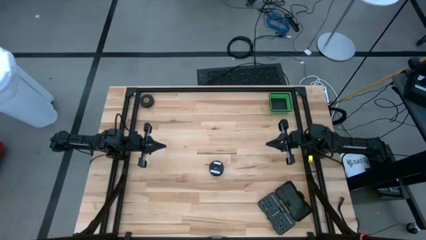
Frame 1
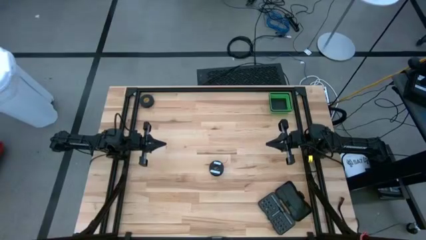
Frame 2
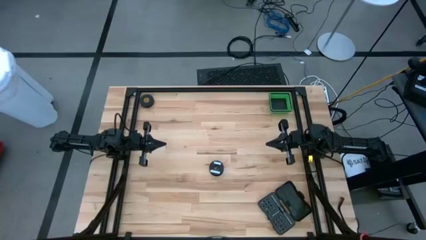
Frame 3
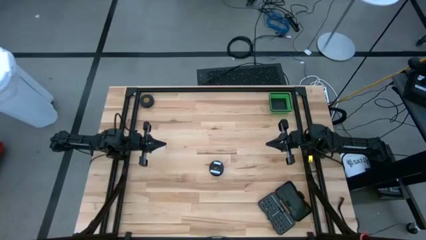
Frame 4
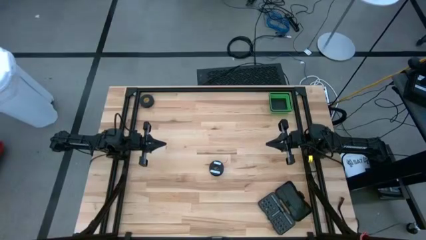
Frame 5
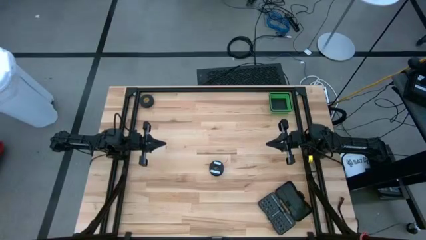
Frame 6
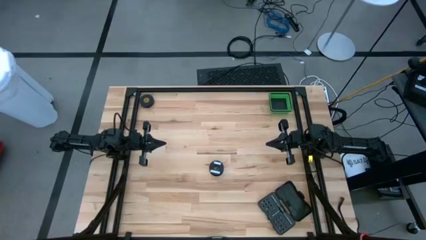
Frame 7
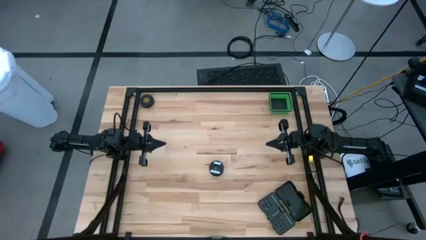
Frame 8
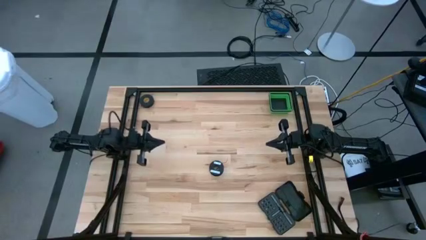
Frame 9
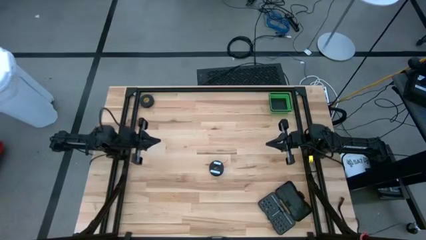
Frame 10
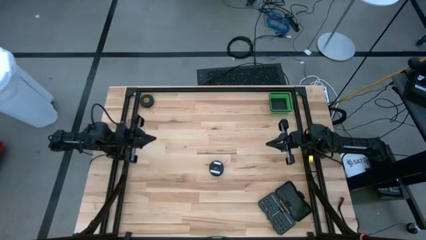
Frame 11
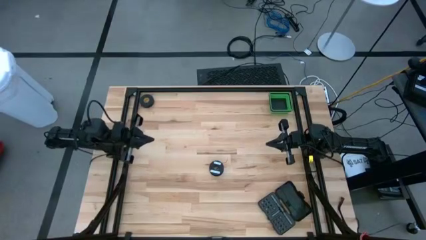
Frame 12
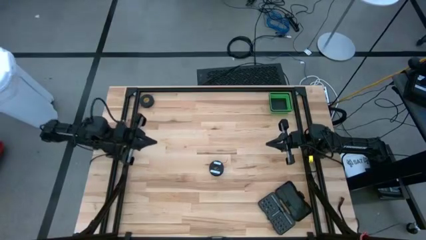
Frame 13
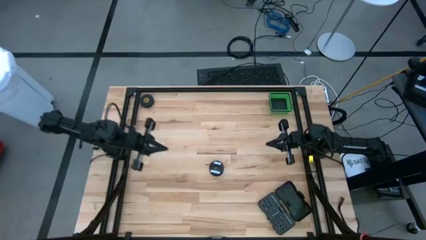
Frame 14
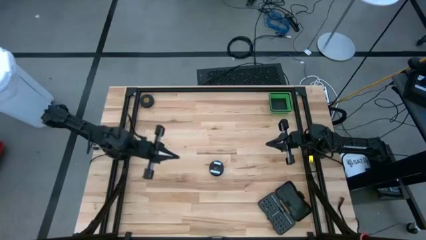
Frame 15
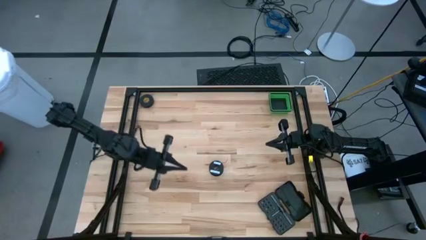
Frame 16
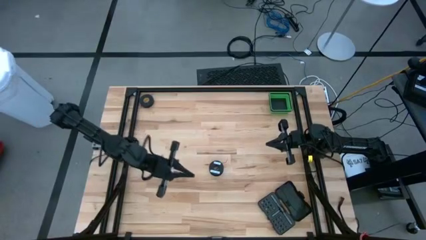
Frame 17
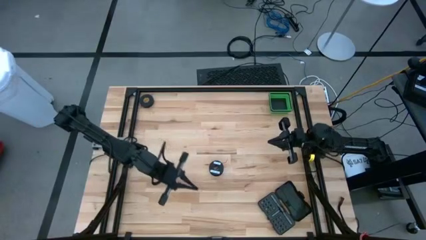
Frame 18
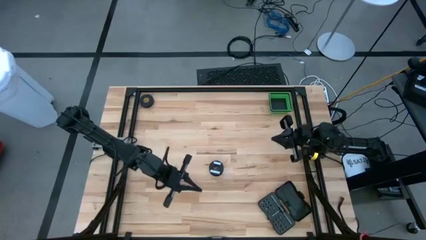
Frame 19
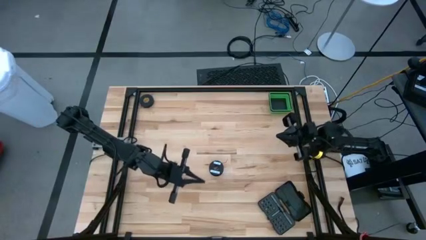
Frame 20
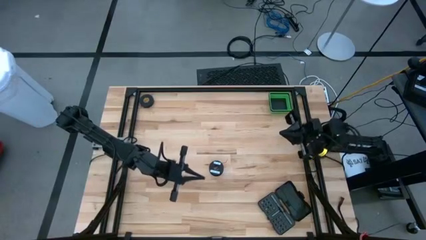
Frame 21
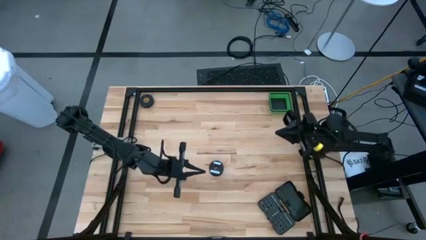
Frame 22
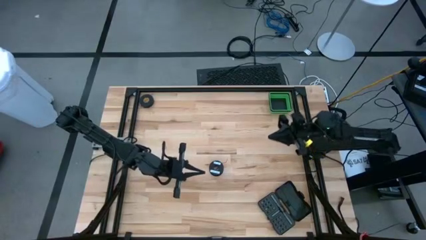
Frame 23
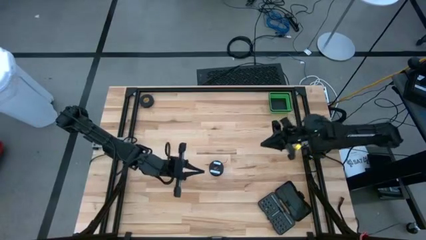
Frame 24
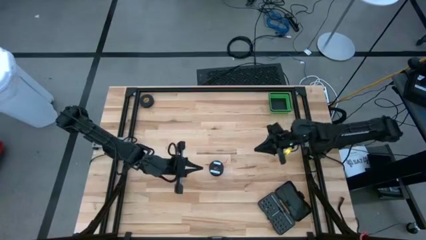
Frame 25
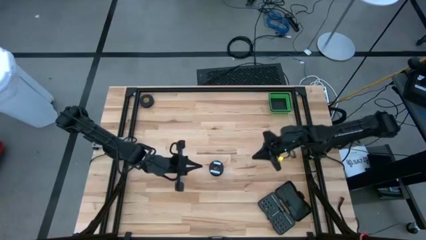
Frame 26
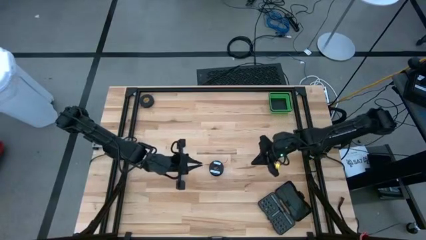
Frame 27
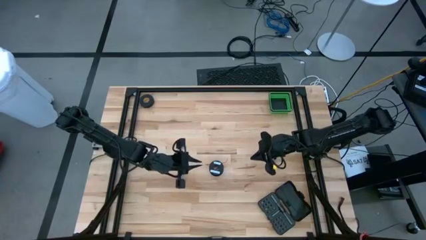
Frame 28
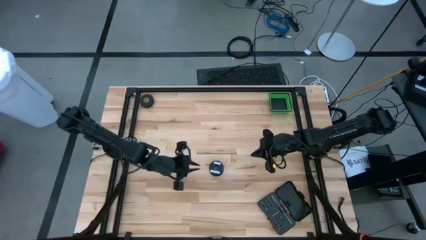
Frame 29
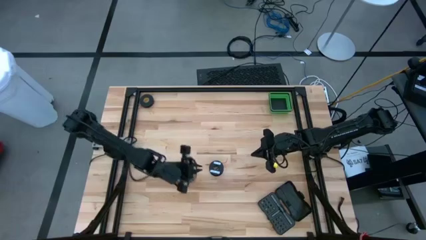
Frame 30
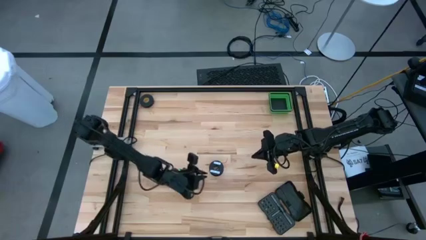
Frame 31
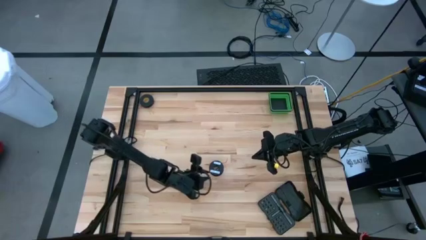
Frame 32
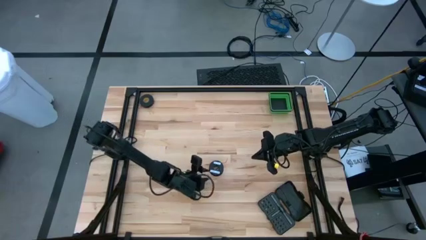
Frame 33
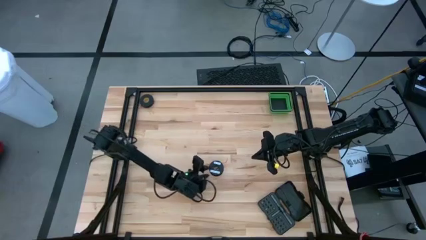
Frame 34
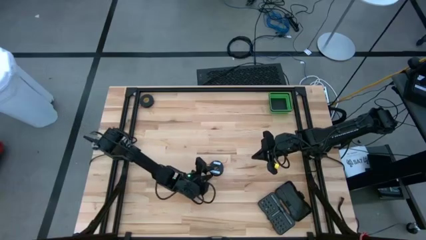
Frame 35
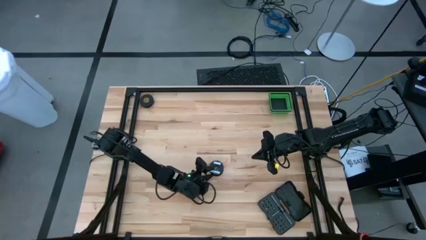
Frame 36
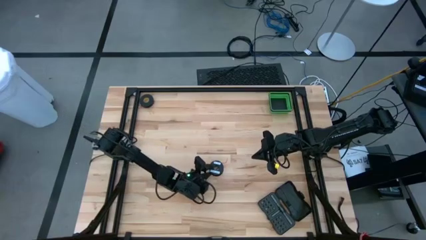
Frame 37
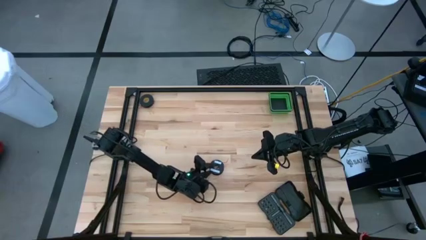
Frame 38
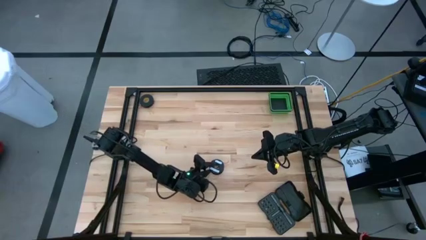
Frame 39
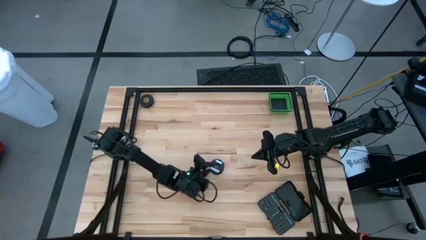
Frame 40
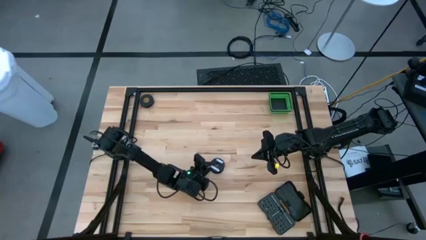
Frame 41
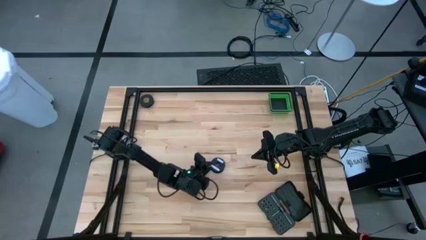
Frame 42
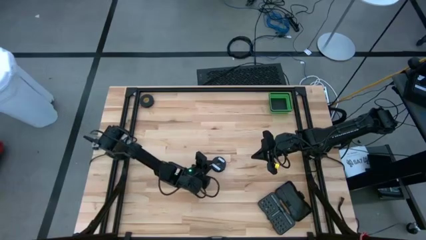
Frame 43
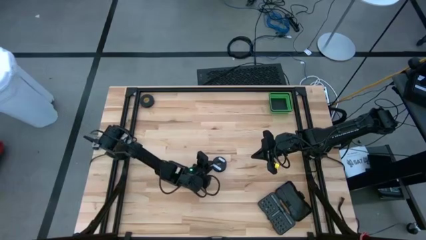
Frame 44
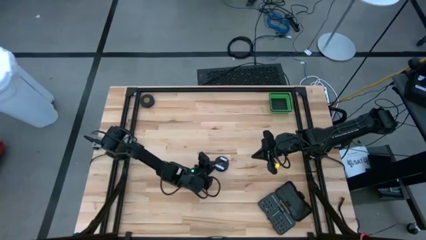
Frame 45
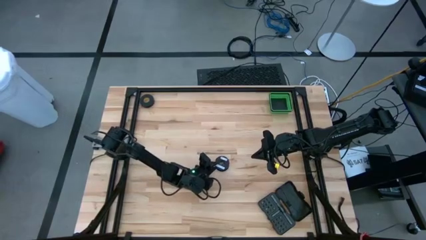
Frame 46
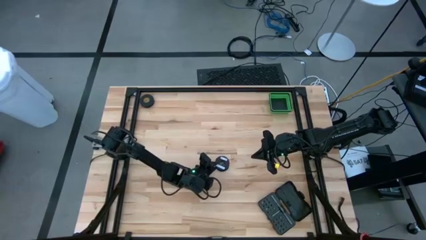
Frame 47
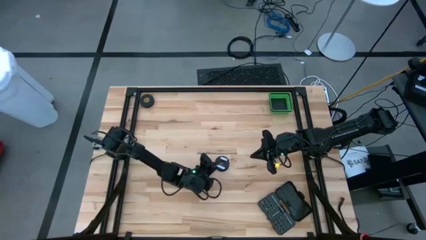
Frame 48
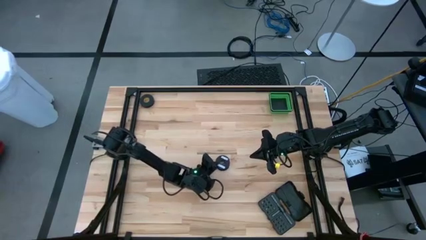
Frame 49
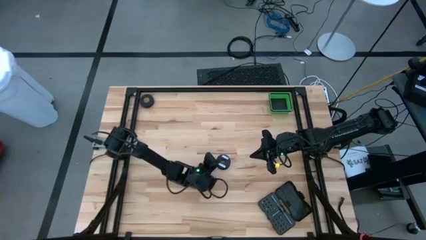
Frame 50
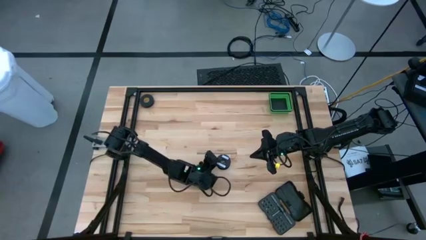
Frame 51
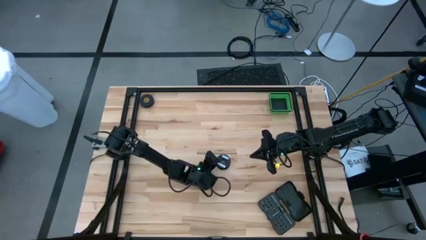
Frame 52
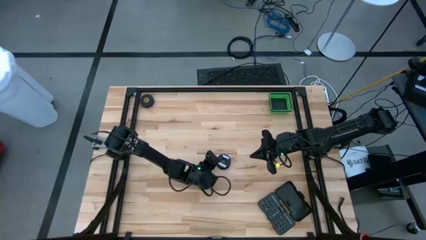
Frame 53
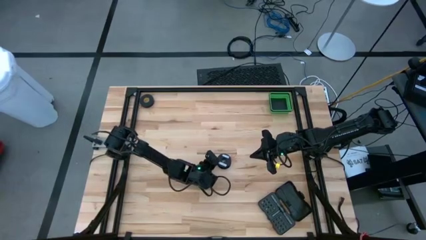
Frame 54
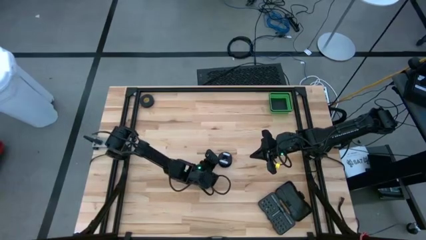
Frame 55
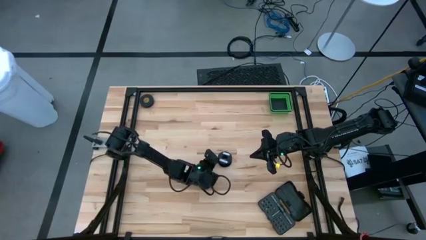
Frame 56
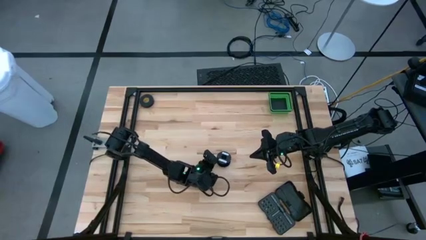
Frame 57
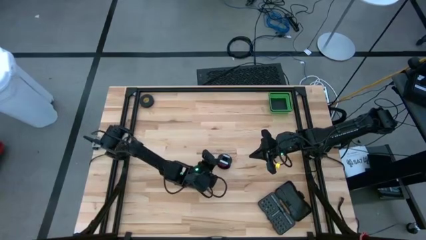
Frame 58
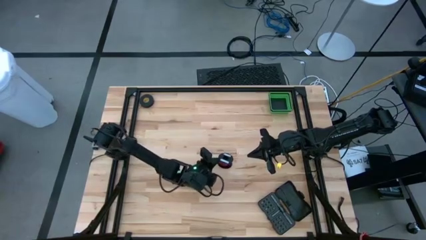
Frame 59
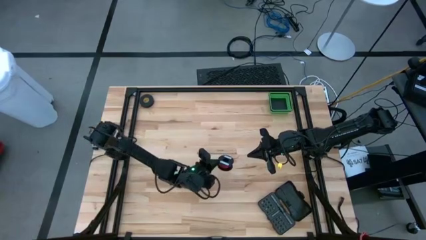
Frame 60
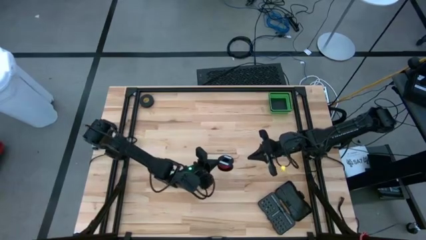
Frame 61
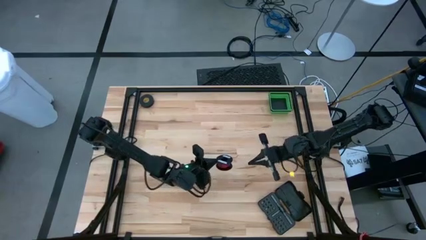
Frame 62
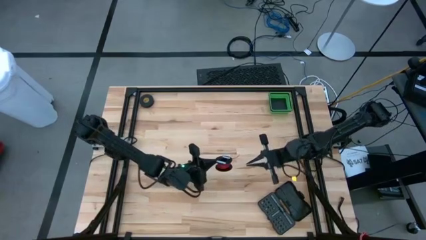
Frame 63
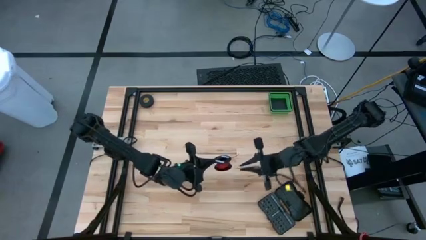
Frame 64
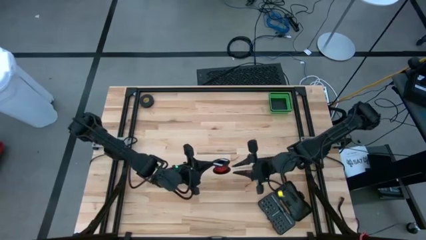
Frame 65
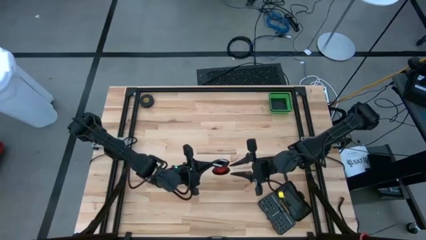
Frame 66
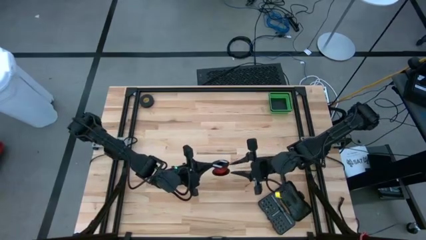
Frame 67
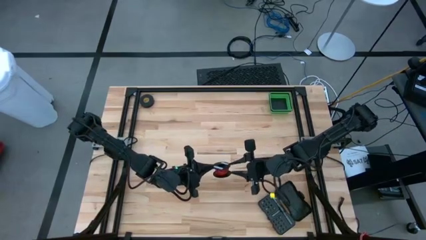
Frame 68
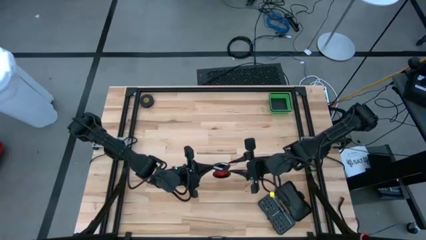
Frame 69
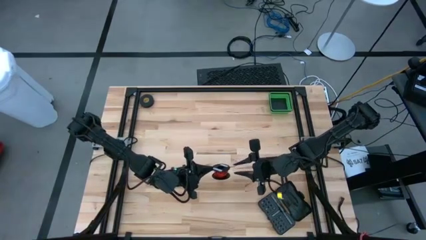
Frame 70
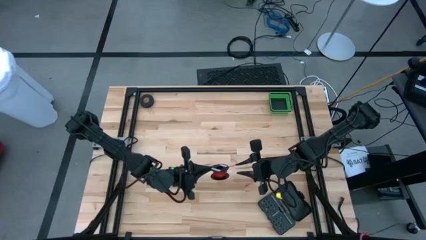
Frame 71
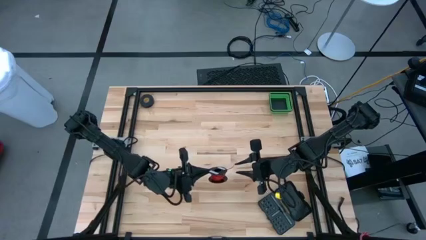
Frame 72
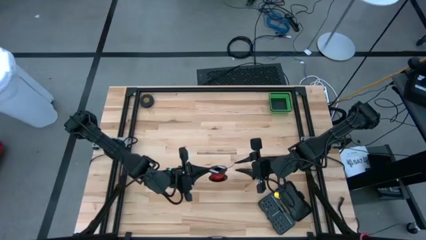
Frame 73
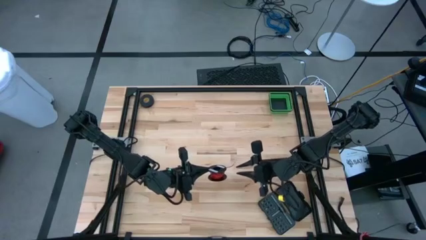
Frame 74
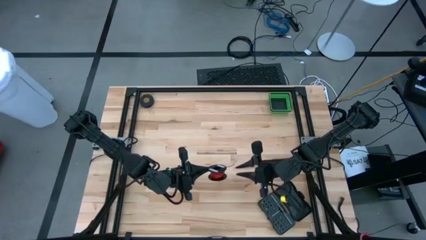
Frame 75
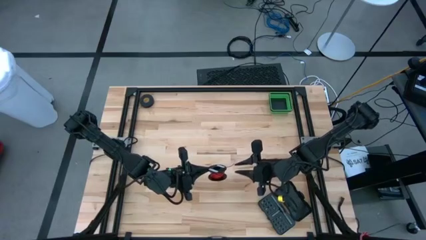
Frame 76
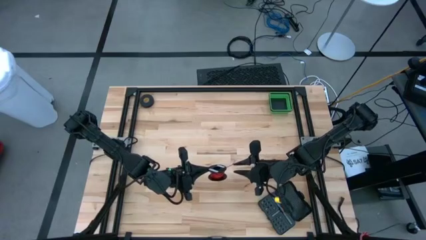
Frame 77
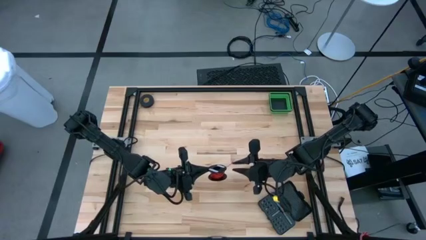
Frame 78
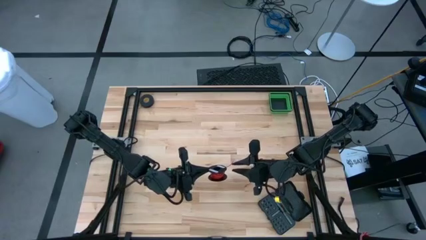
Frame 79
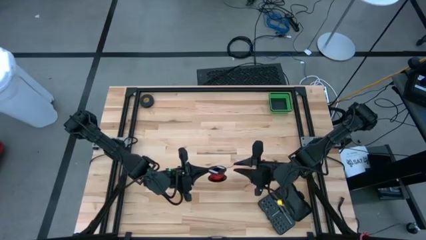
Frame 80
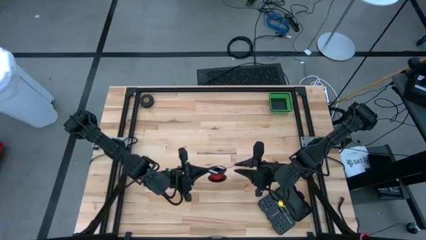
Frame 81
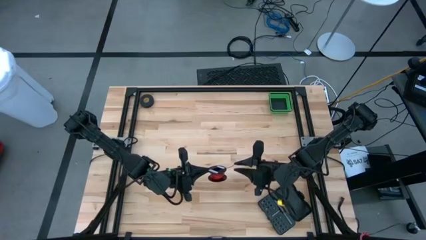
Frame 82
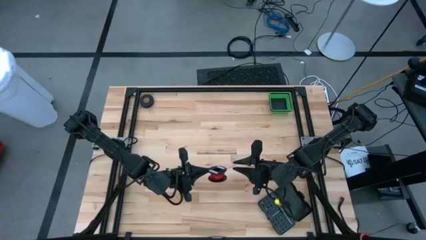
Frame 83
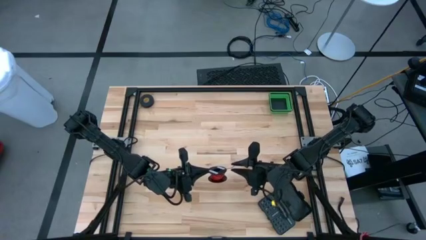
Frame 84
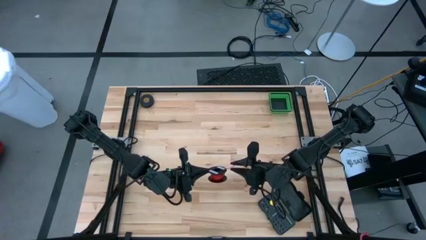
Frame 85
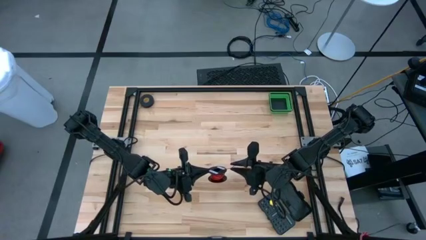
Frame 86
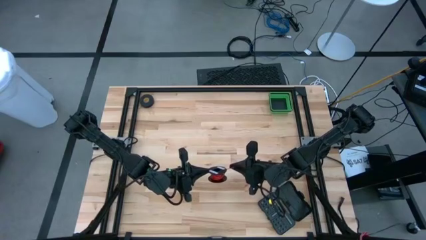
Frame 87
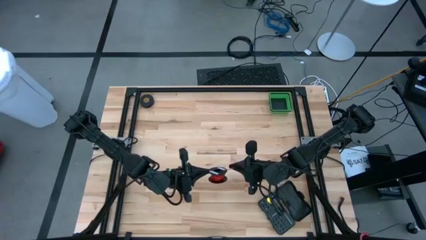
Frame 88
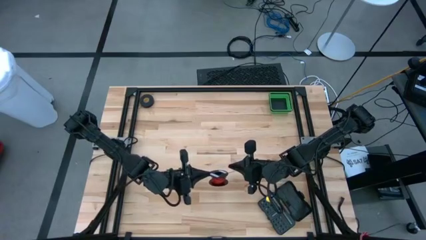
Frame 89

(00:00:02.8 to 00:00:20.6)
Task: Coil cords
Uncoil the red wire on the black spool
